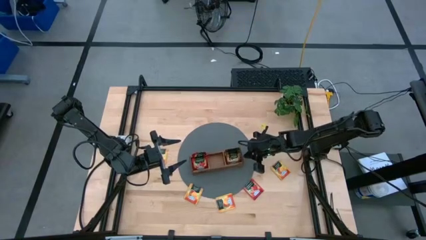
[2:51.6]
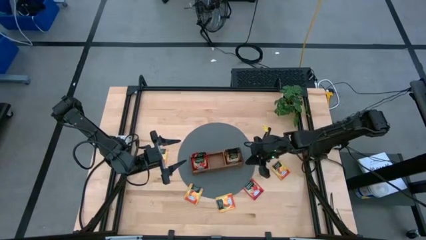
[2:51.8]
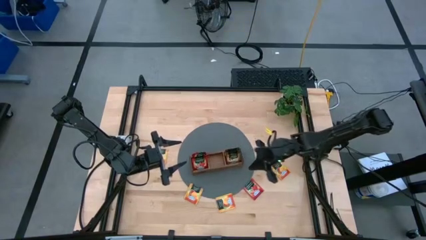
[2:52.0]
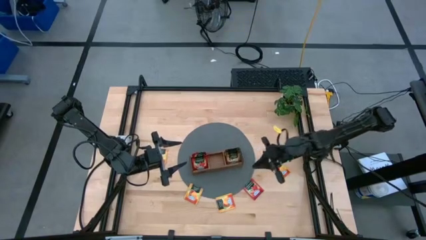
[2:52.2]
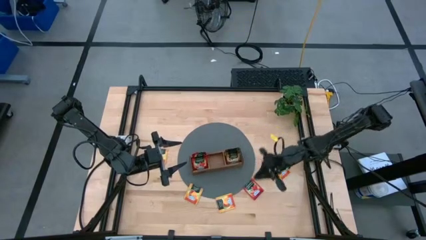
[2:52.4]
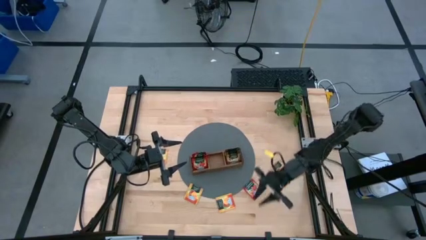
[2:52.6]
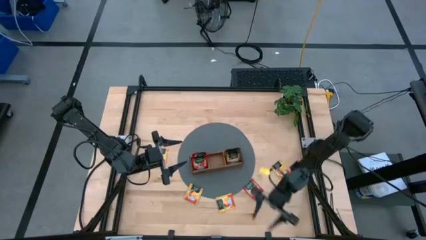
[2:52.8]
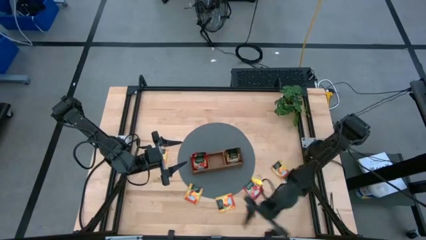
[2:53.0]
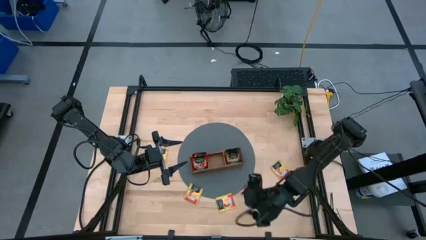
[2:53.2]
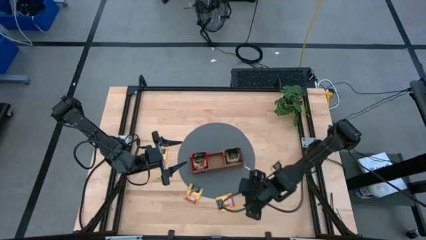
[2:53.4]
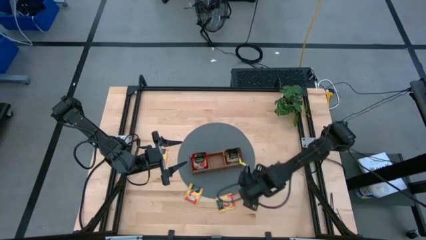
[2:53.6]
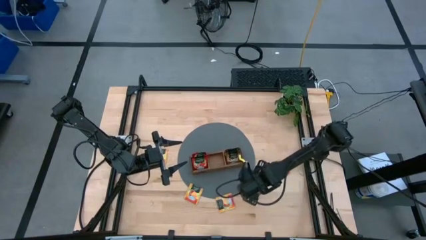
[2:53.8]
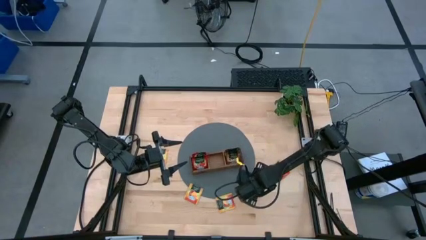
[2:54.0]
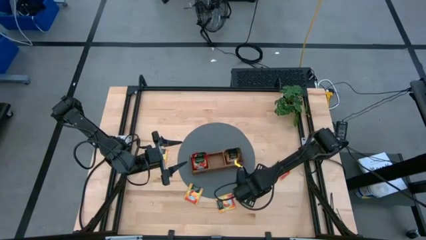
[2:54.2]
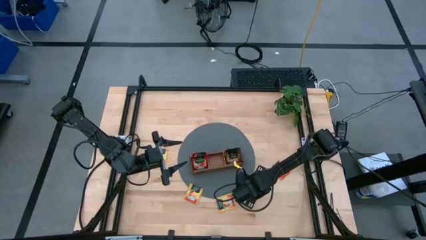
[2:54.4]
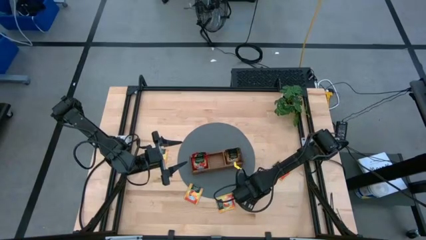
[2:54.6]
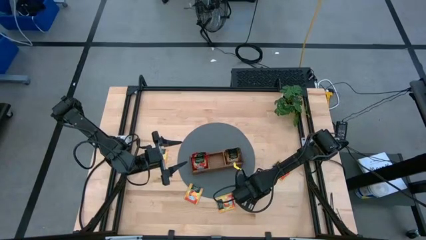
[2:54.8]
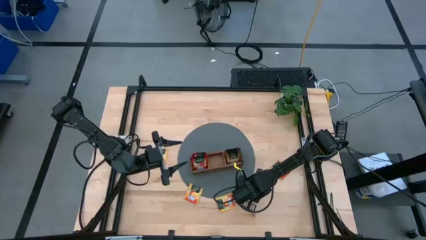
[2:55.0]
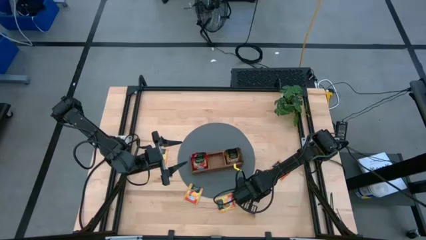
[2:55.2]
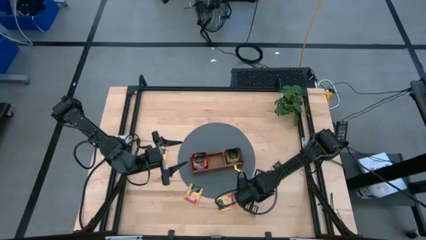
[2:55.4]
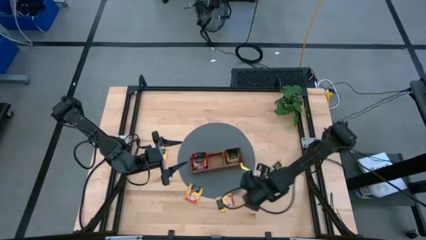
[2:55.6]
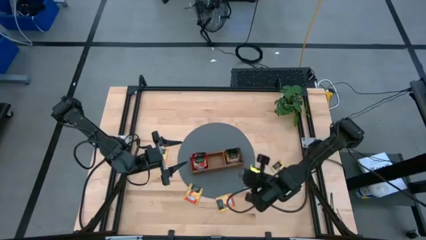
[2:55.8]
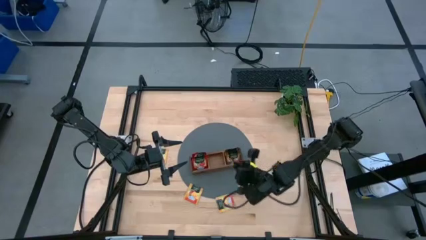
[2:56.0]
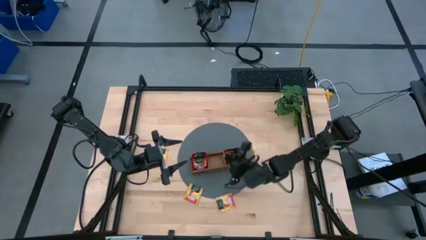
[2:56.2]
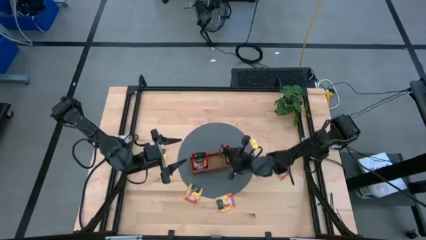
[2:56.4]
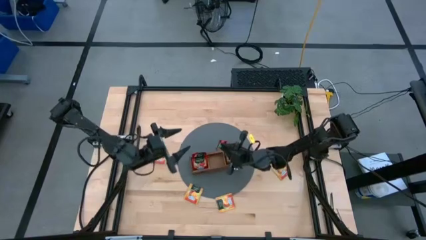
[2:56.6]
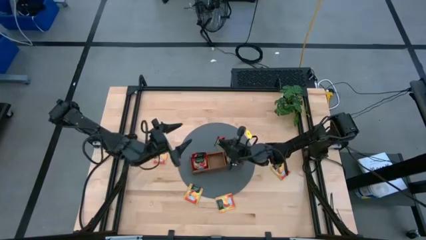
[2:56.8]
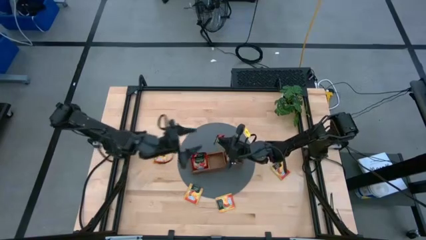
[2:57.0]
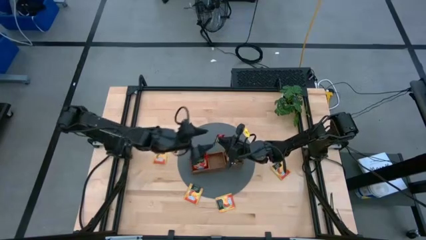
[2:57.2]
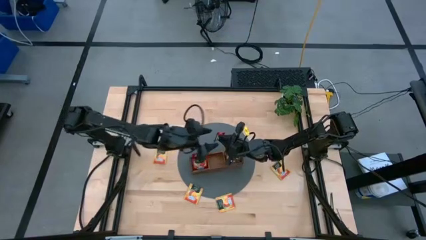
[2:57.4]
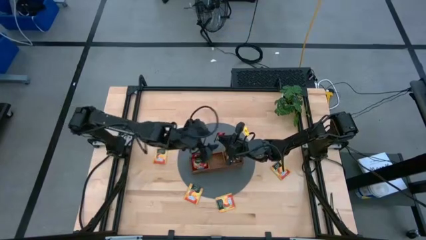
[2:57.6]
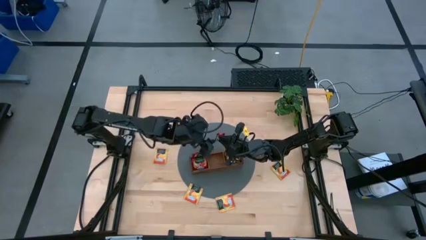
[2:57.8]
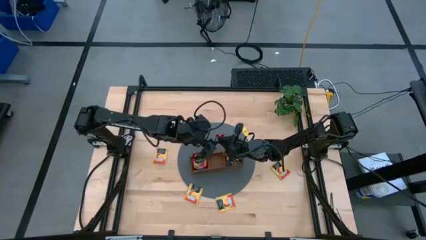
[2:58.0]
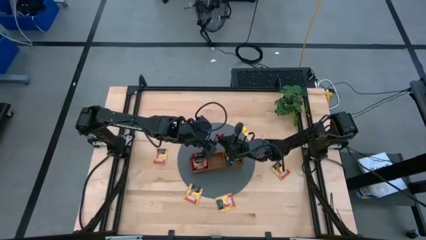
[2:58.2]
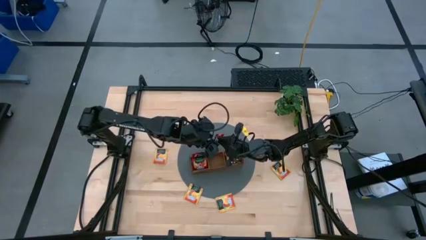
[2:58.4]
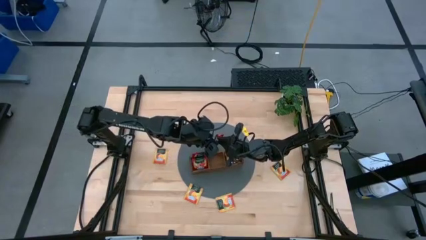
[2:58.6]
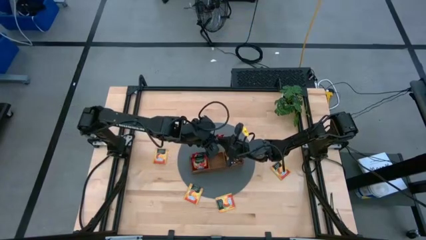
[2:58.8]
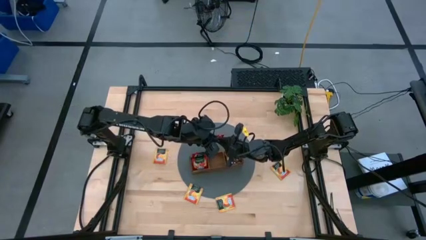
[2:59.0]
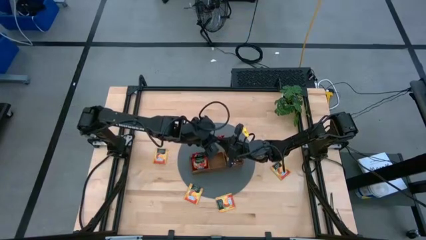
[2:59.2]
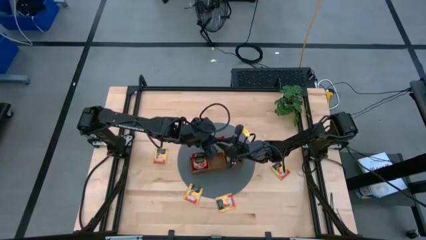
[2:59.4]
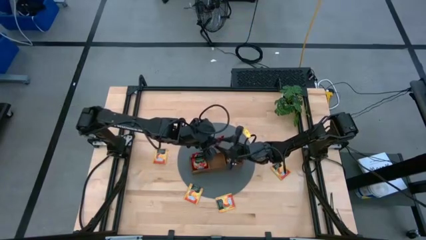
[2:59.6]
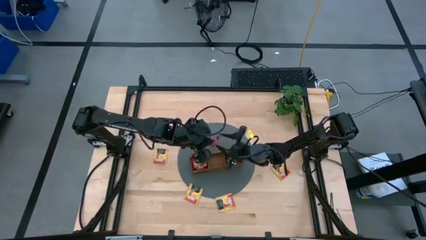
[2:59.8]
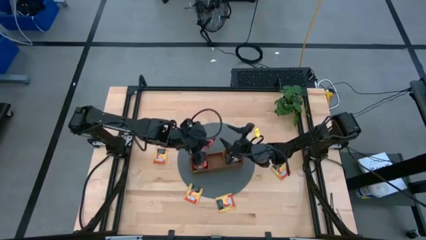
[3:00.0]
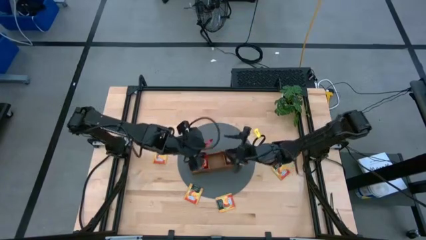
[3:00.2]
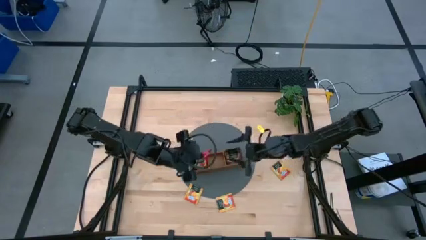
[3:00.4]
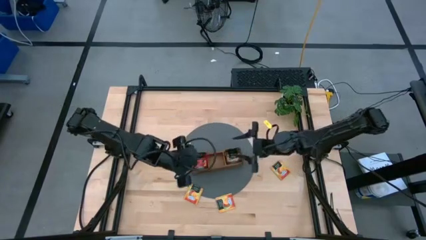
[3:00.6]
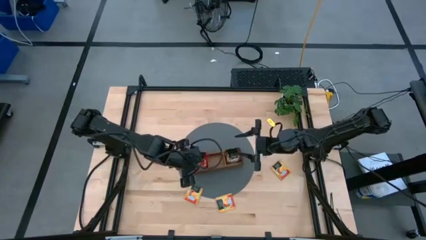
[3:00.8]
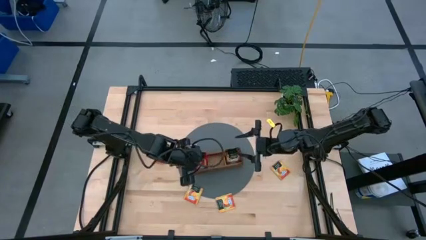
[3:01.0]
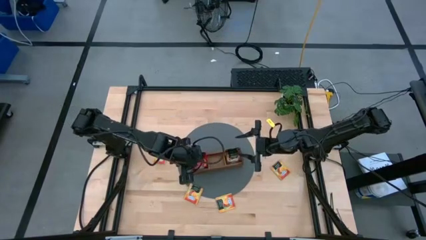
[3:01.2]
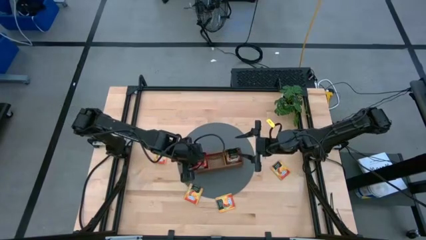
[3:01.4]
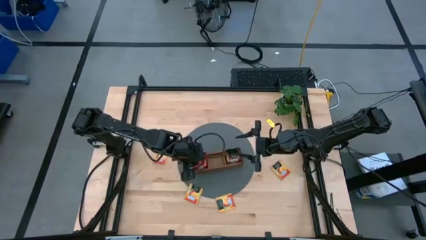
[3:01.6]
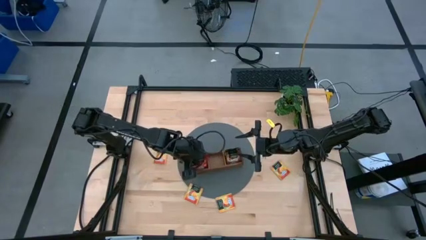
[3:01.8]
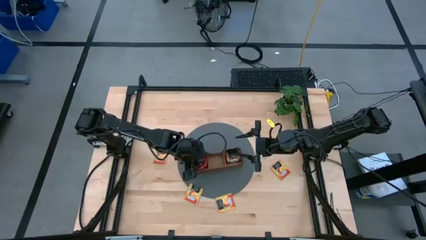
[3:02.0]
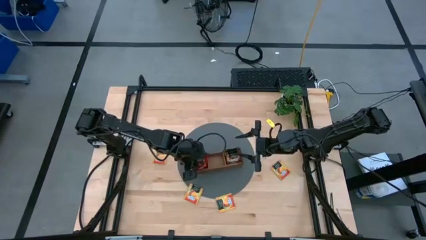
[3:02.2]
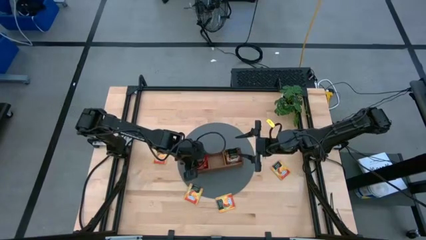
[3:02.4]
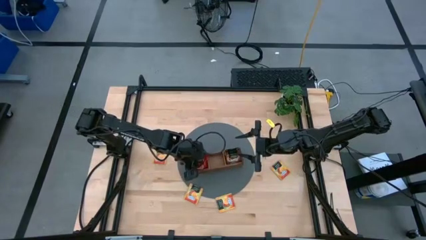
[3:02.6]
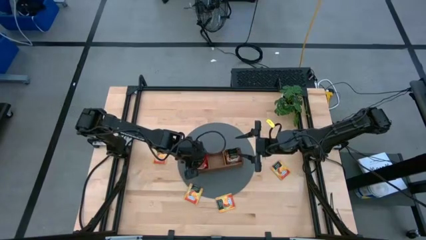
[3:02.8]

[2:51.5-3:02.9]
Task: Pick & Place Tea
Put the red tea bag into the left section of the wooden organizer

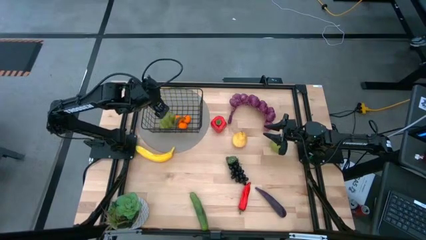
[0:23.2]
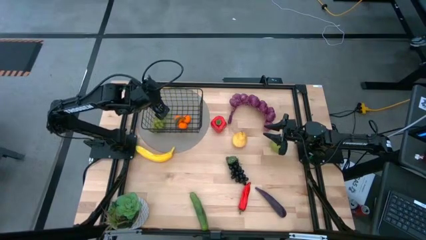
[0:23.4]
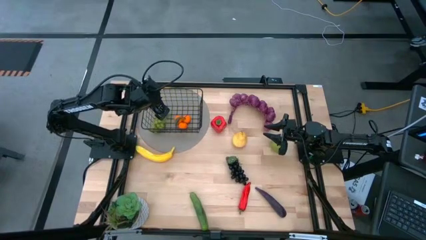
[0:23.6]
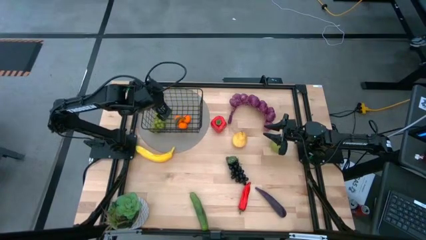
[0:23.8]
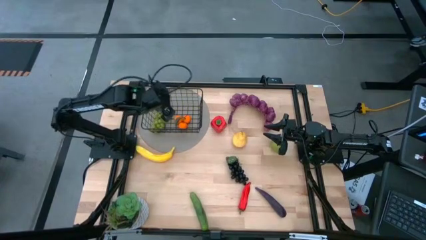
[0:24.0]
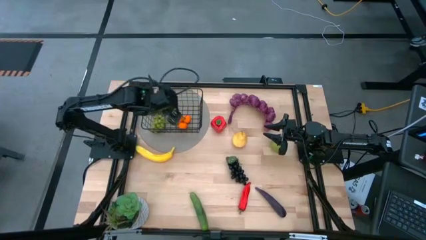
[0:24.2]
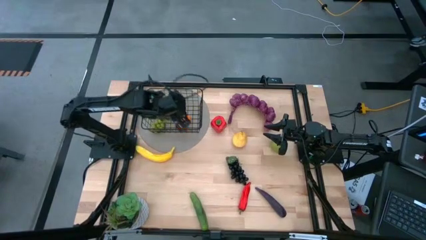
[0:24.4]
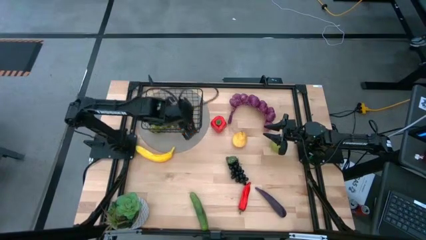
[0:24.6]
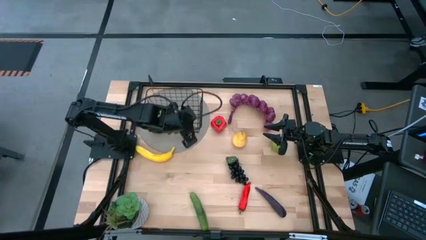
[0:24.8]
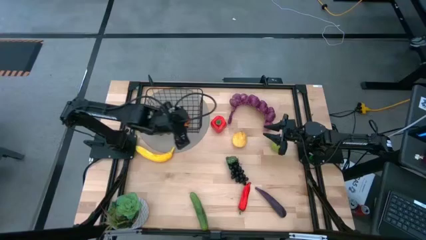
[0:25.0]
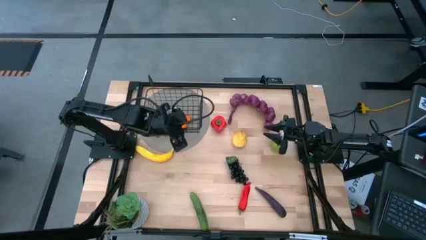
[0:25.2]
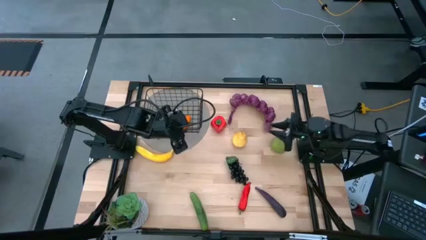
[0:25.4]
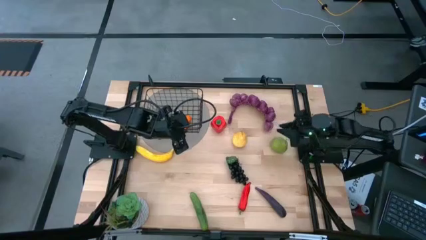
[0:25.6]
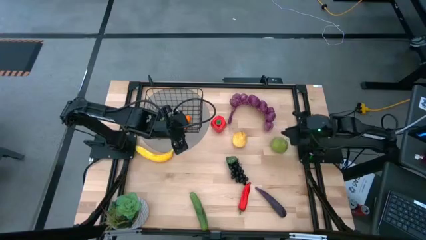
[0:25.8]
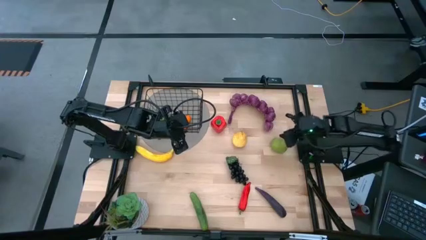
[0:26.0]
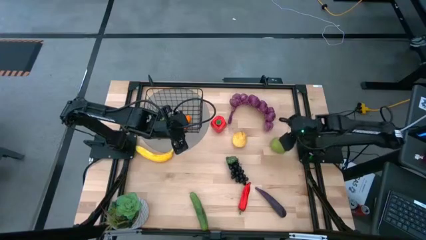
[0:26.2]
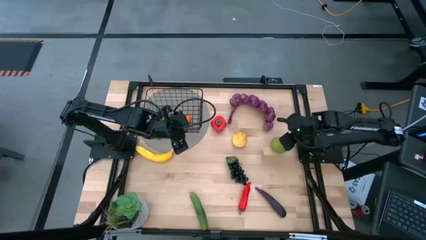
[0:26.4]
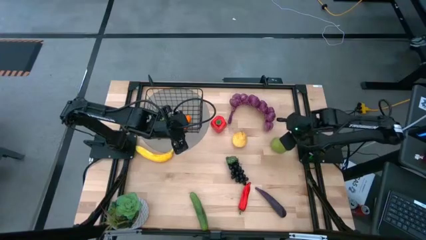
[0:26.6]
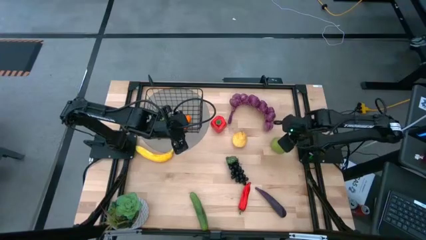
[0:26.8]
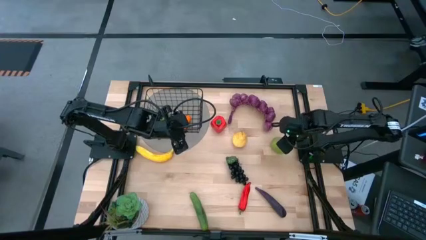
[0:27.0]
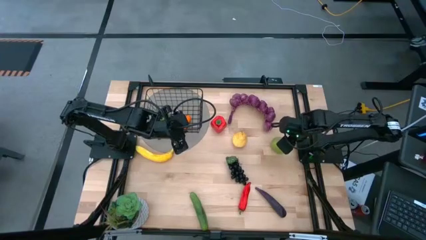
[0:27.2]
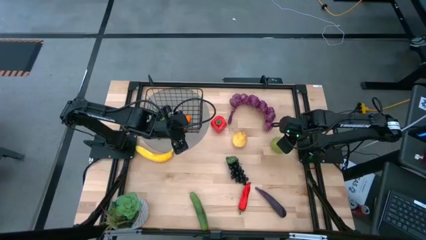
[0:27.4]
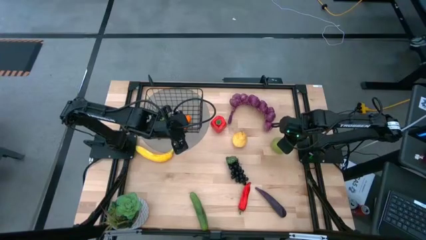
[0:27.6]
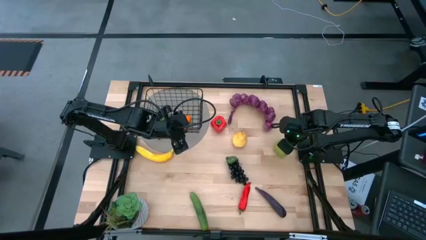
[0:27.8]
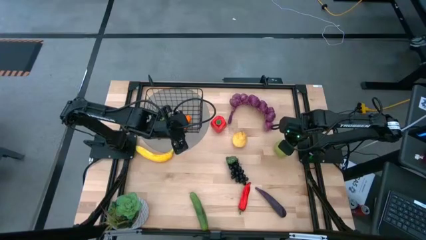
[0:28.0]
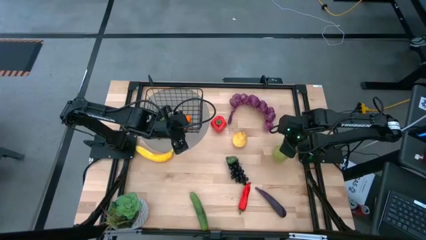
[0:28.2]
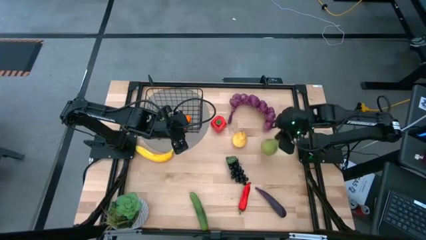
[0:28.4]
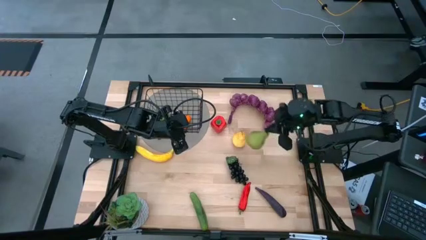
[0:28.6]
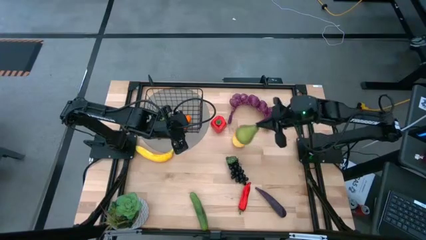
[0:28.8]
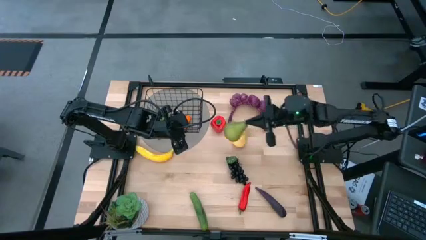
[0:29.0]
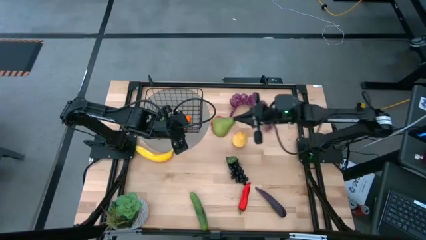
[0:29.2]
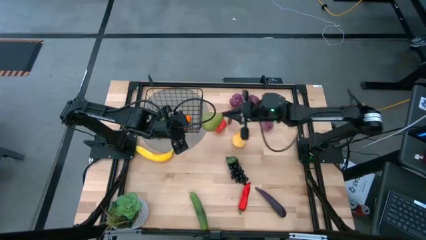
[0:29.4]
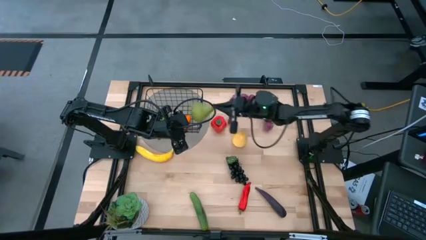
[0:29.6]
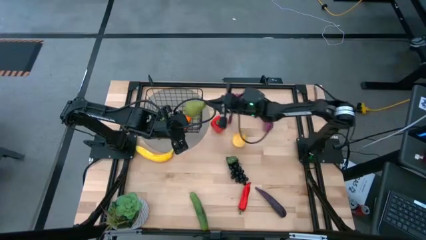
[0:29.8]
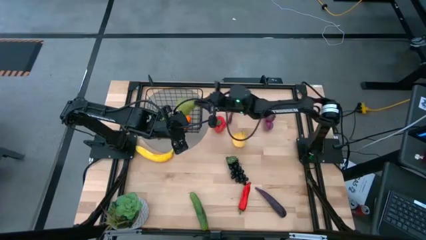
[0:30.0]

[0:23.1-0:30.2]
Task: Build produce basket
Put the green pear into the wire basket
